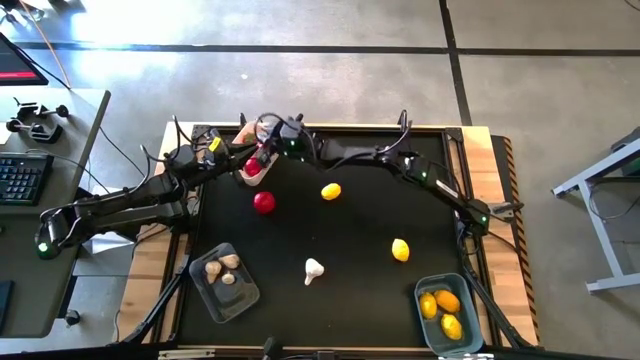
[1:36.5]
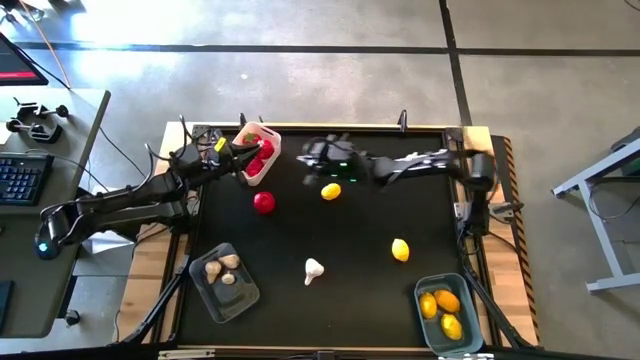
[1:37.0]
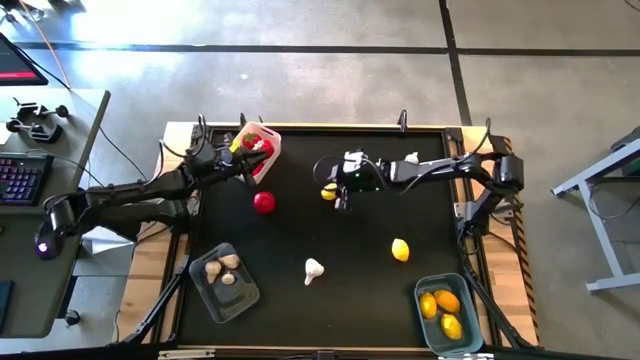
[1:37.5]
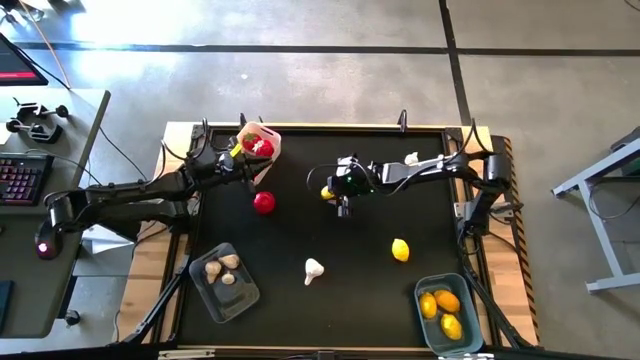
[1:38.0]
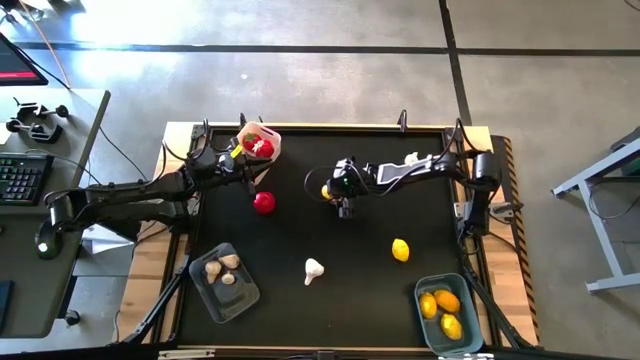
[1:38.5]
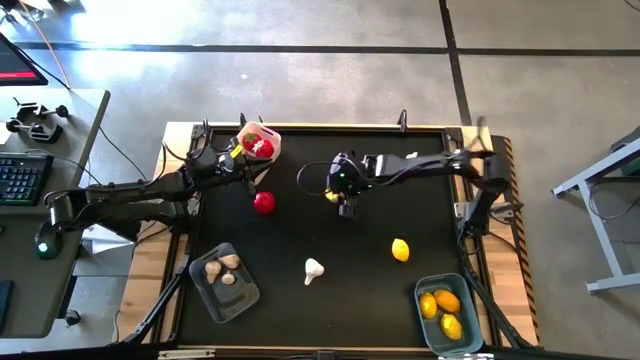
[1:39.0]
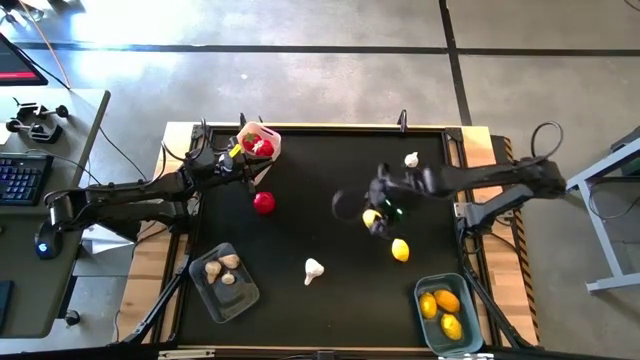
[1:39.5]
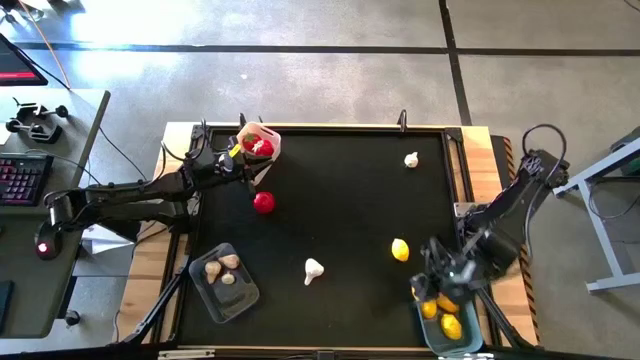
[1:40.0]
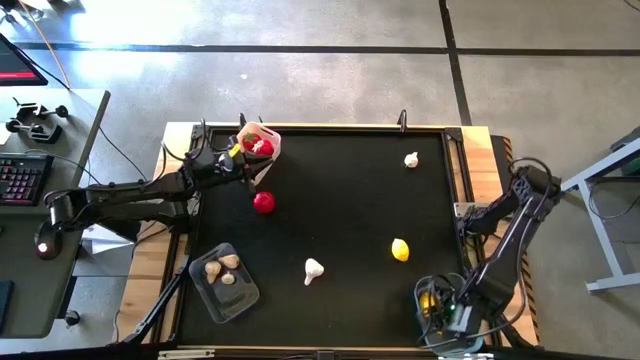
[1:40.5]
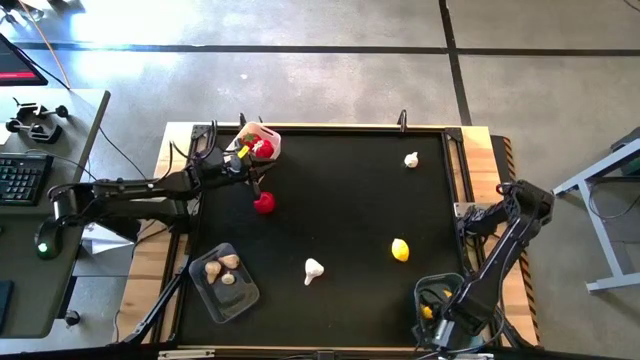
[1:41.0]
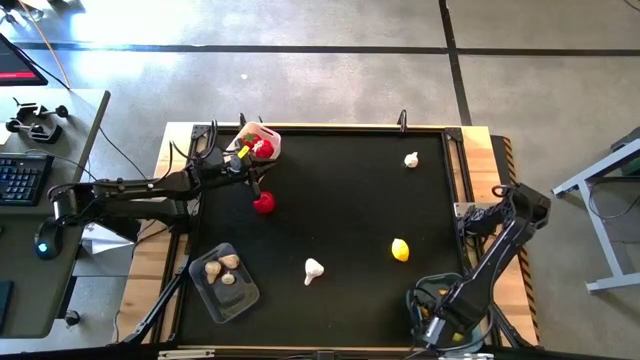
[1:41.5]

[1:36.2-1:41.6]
Task: Sort produce into baskets
Put the yellow lemon into the blue bin

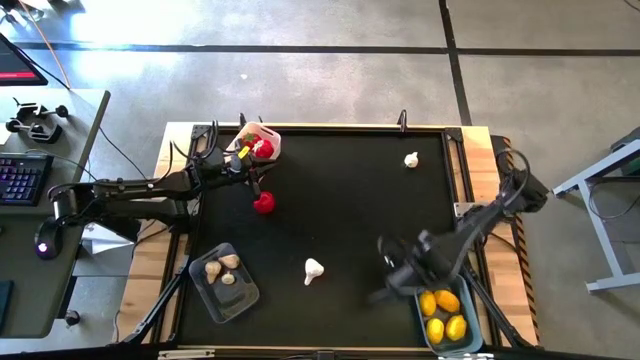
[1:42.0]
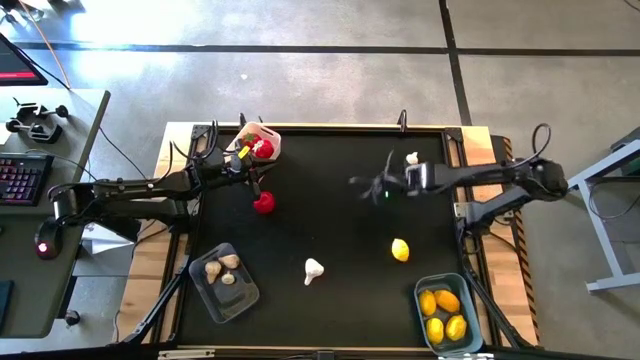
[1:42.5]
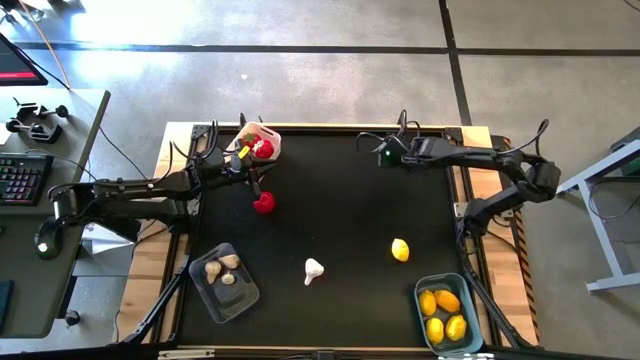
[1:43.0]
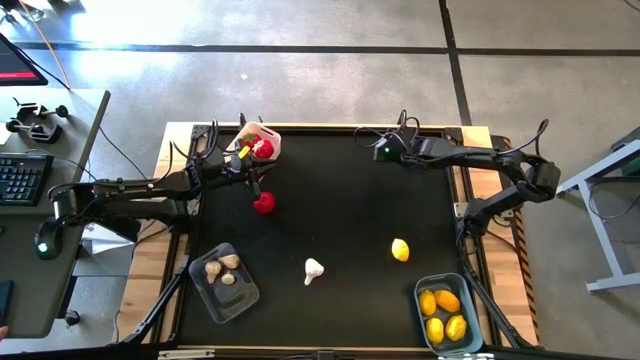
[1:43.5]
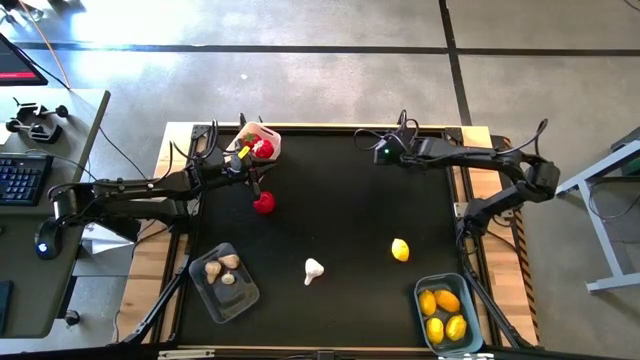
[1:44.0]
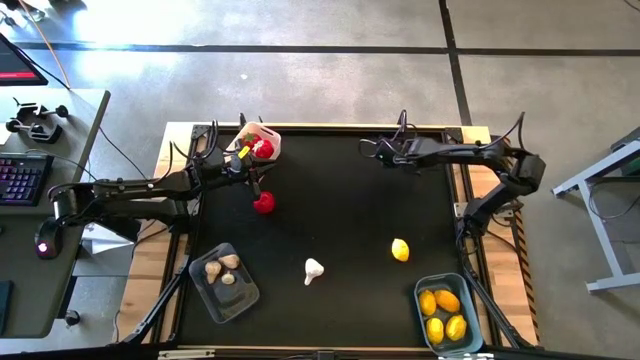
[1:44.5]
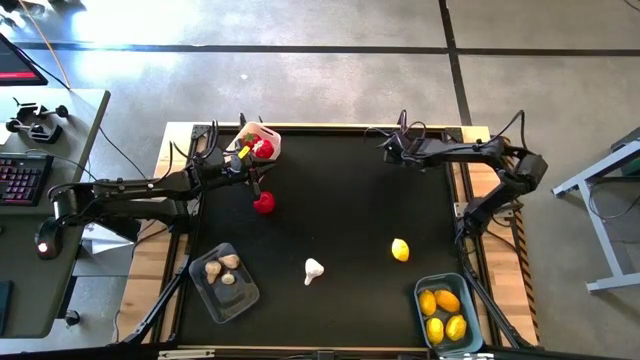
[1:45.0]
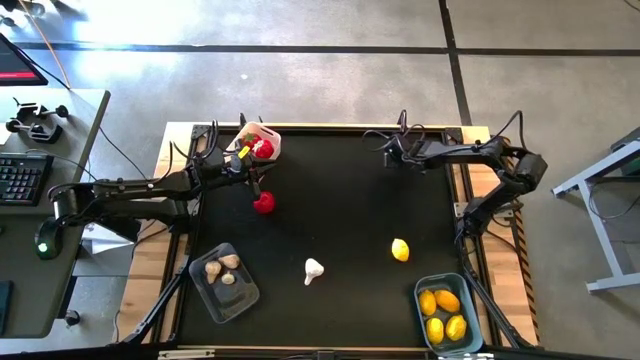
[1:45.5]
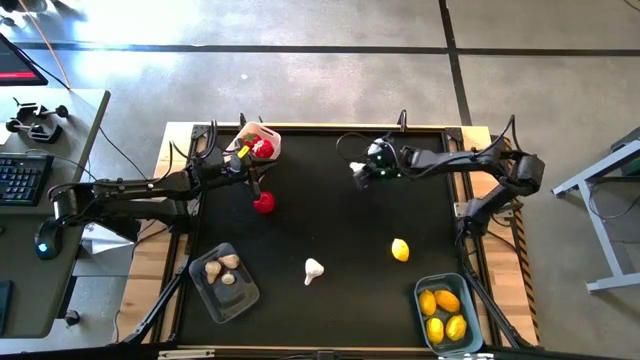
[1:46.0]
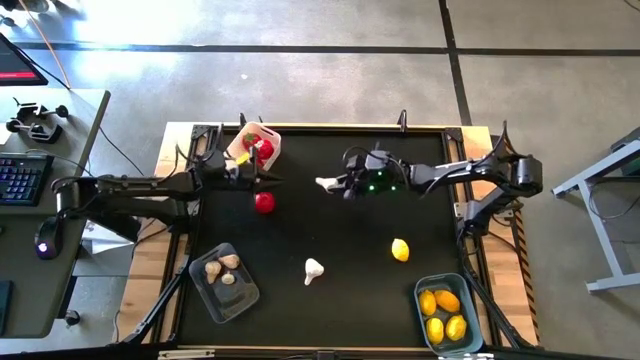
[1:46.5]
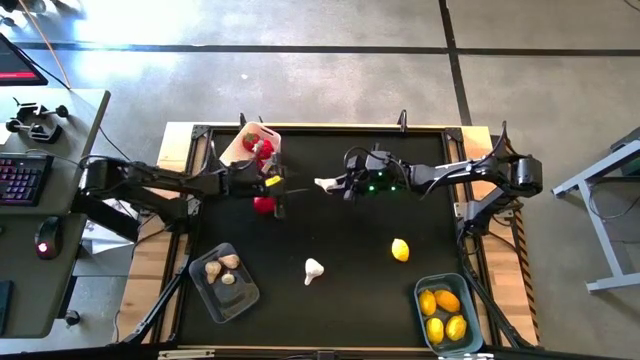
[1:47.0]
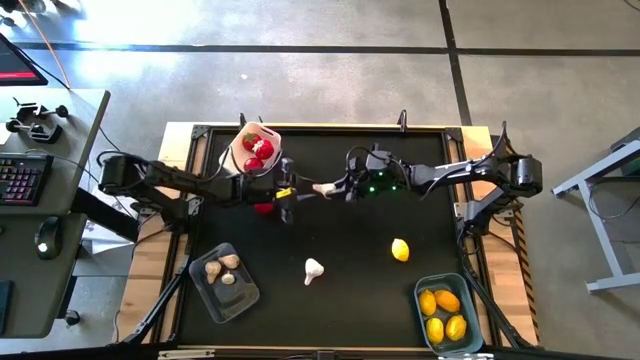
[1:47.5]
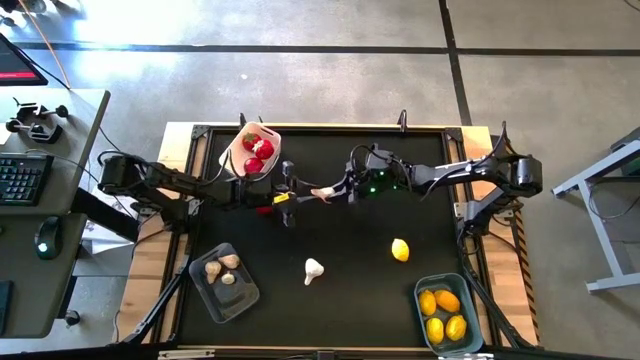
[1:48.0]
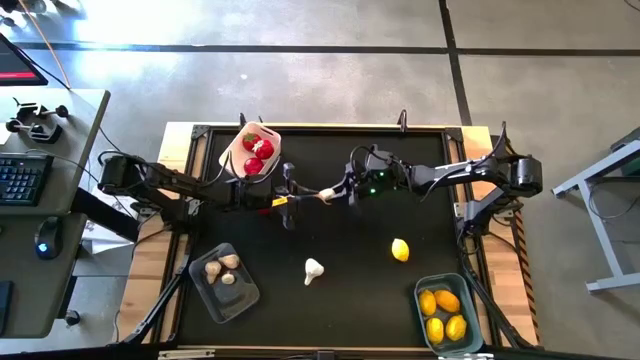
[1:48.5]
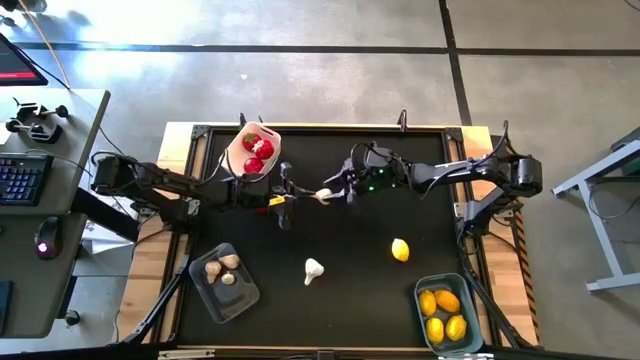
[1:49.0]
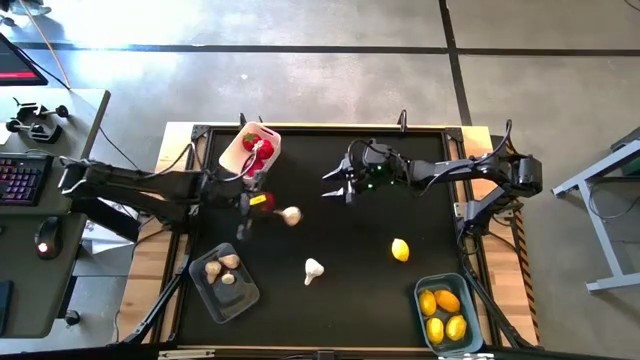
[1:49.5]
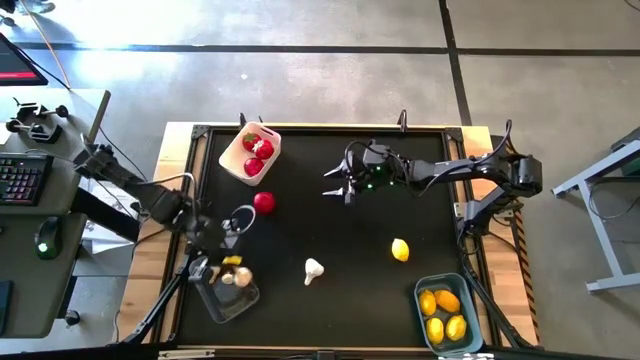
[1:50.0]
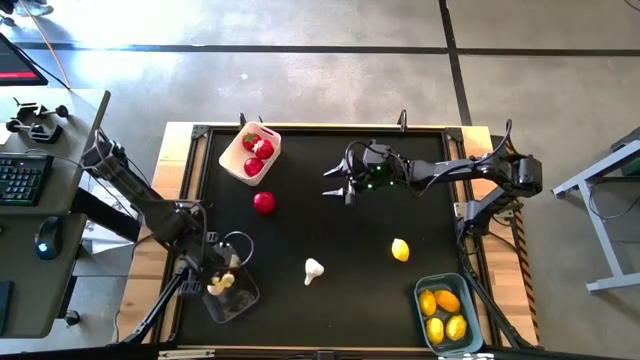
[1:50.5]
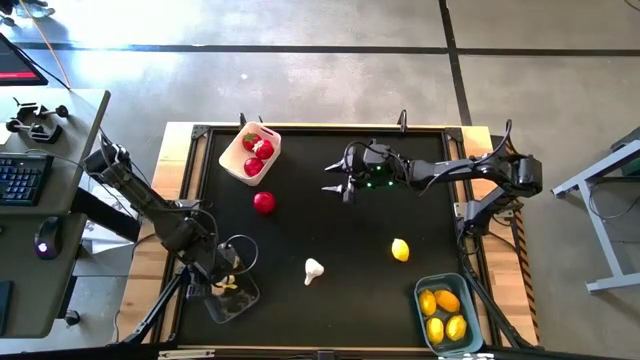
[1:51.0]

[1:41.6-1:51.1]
Put the white garlic into the transparent bin

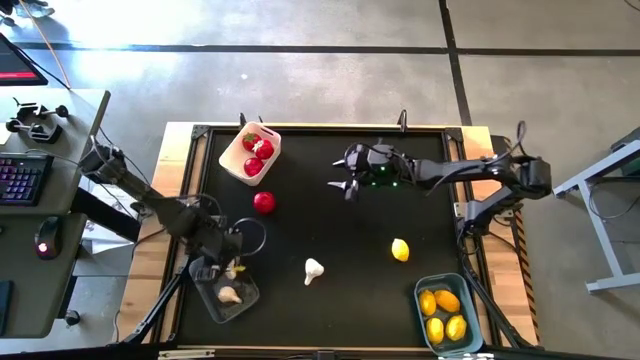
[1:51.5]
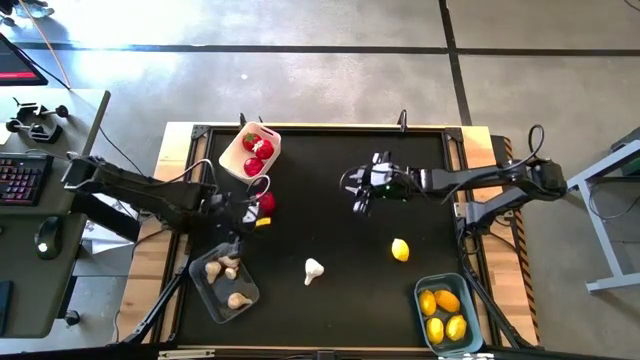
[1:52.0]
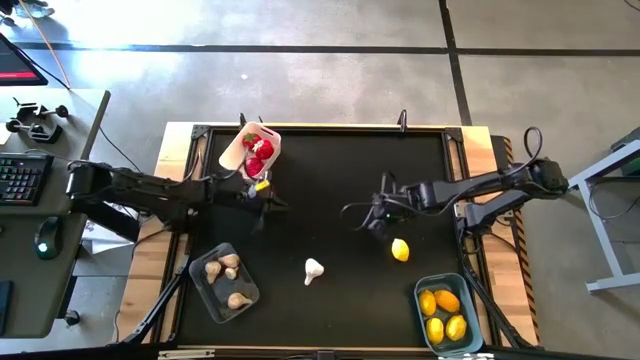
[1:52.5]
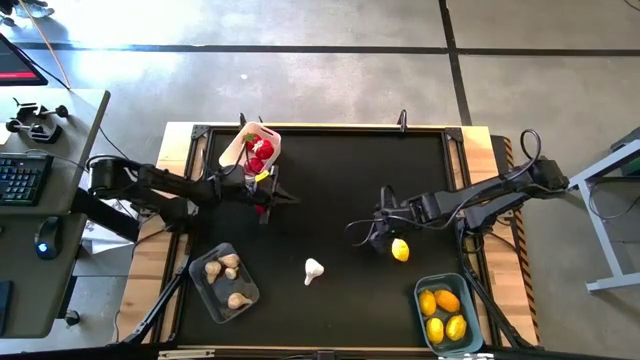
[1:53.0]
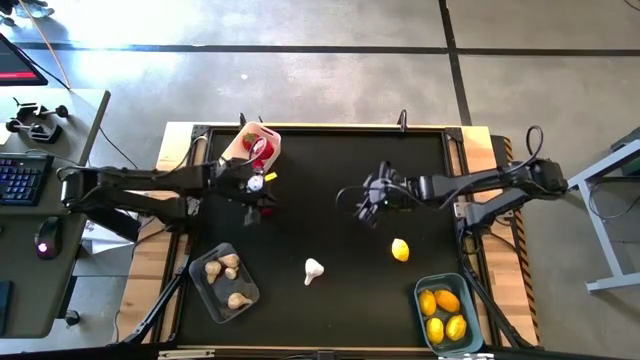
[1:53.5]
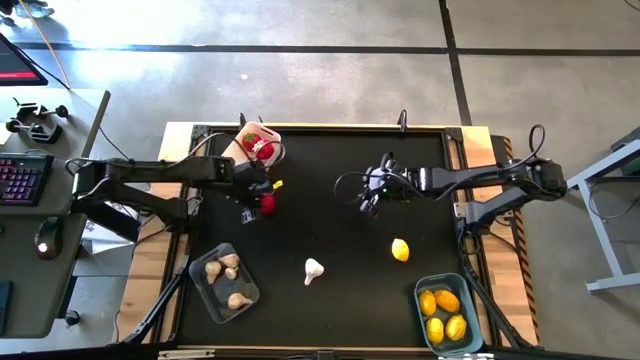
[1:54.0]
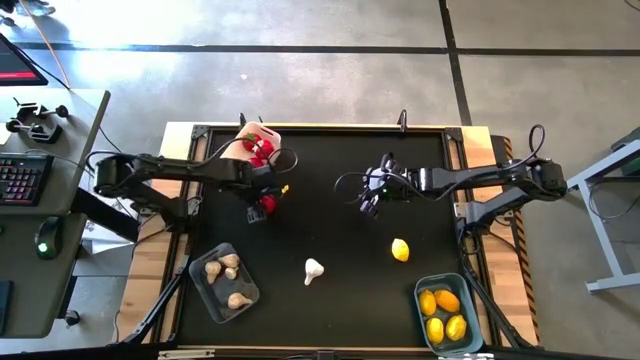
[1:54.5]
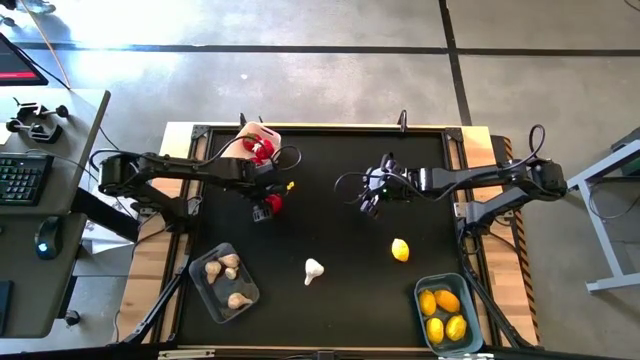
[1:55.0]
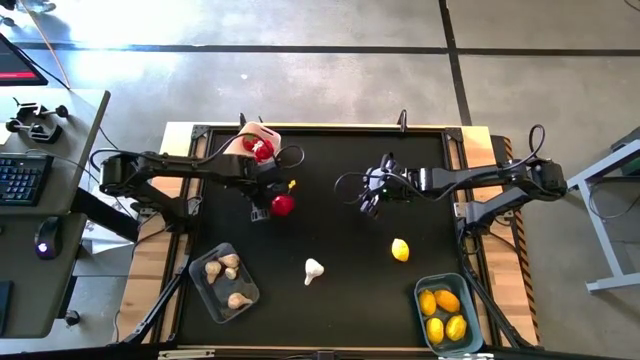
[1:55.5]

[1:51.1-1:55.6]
Put the red tomato into the white bin

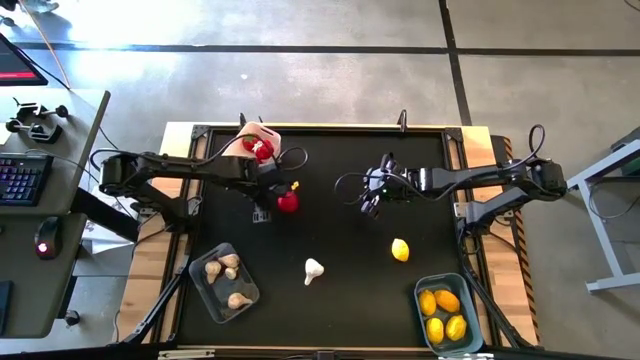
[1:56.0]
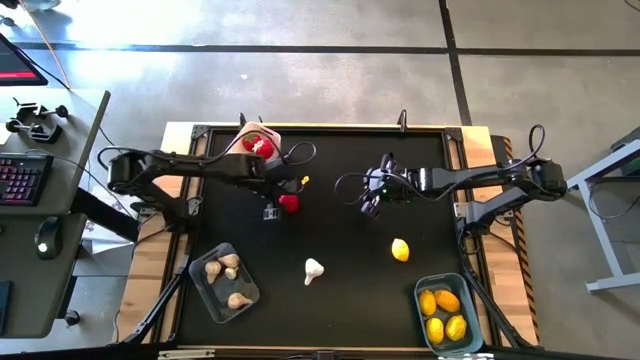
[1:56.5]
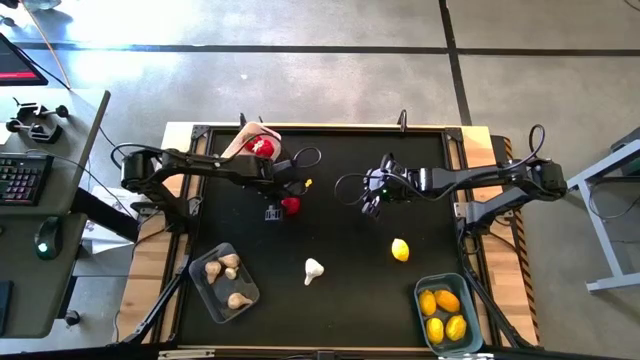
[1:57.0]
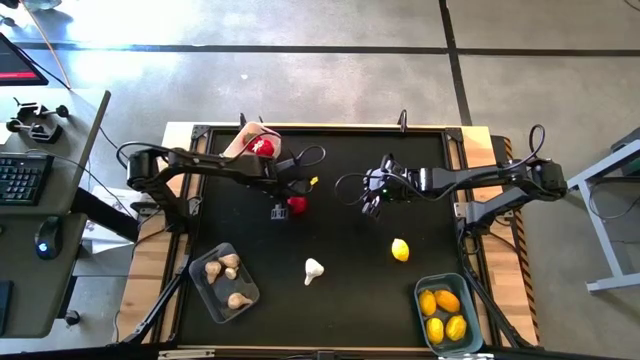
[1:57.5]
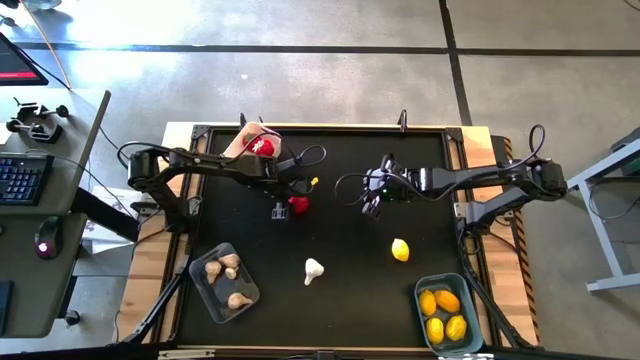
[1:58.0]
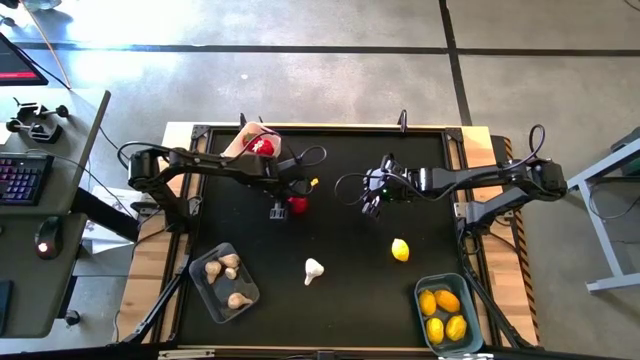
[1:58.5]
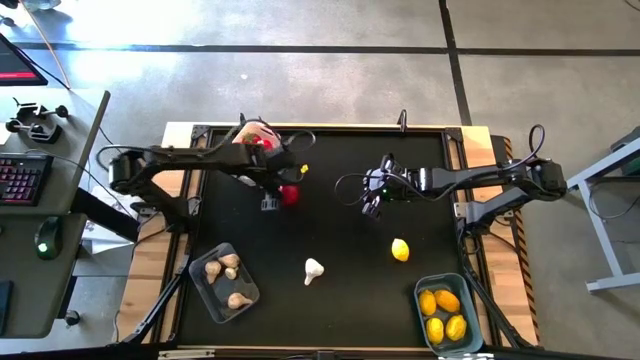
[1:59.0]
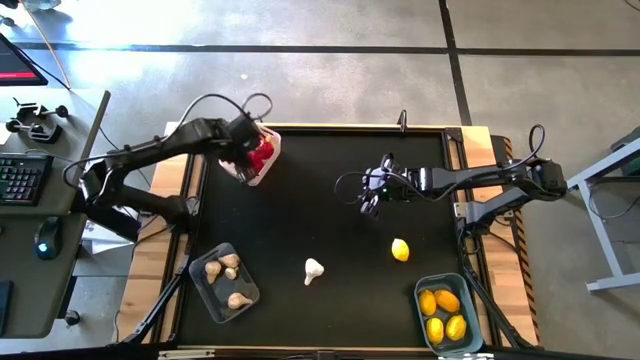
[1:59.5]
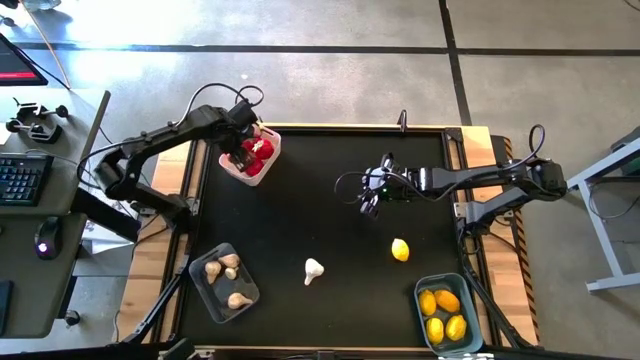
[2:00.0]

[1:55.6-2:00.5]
Put the red tomato into the white bin
